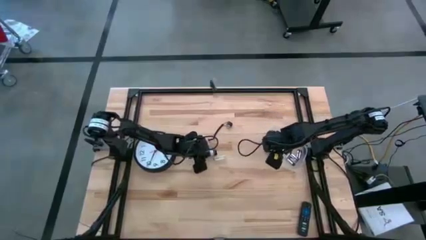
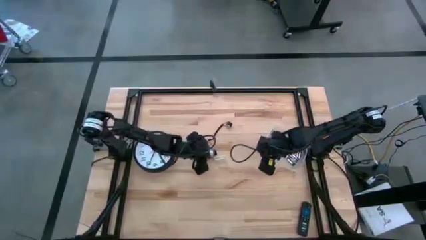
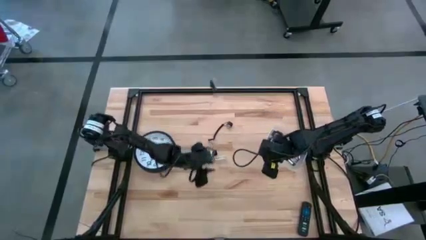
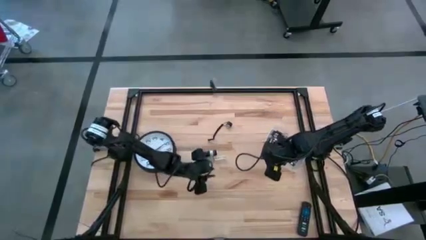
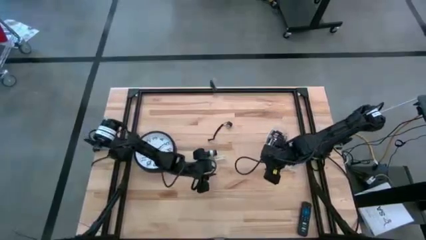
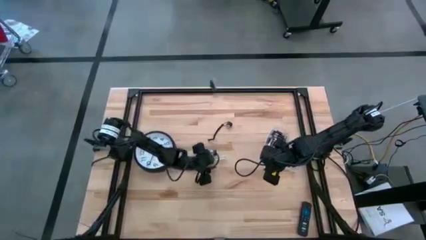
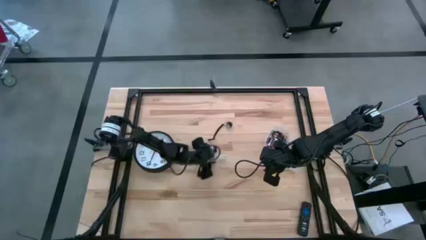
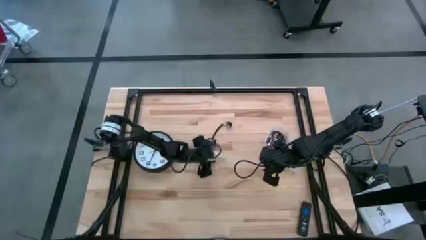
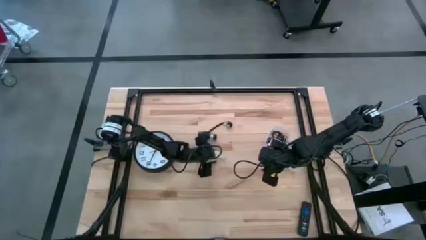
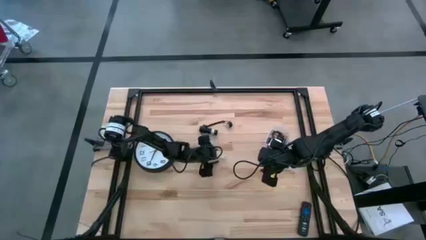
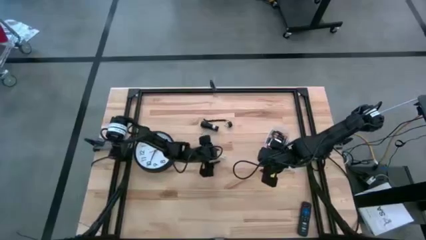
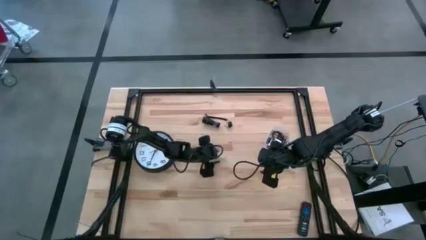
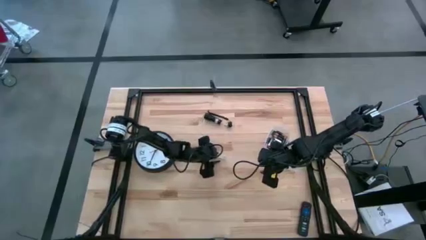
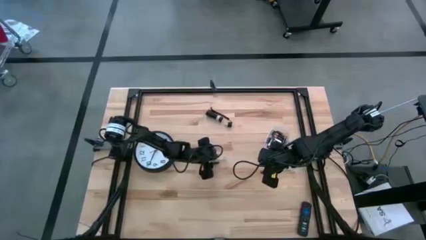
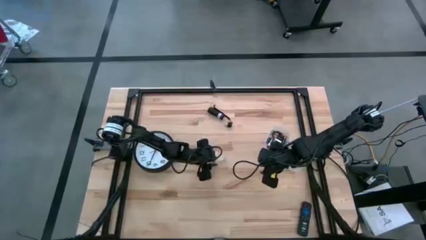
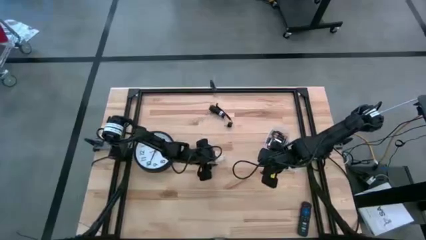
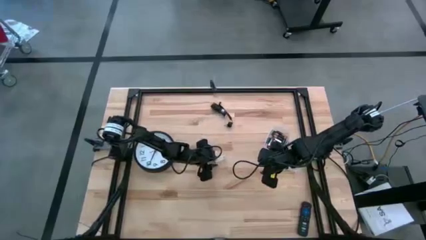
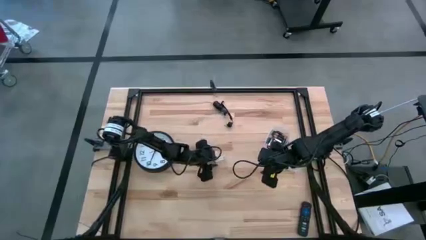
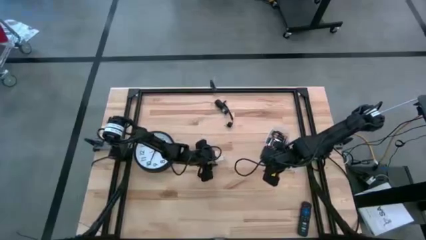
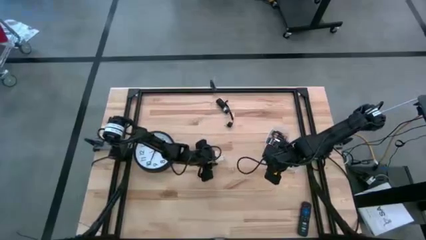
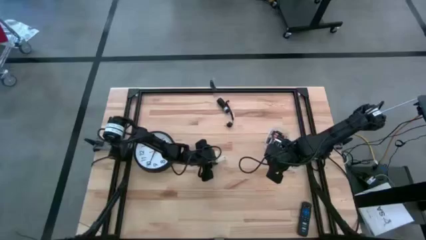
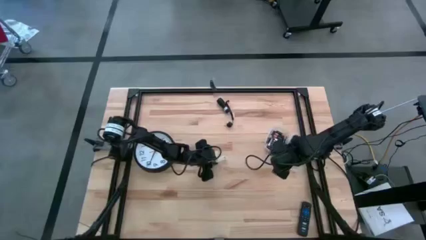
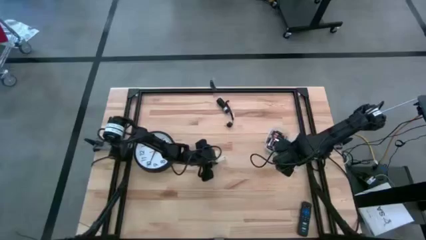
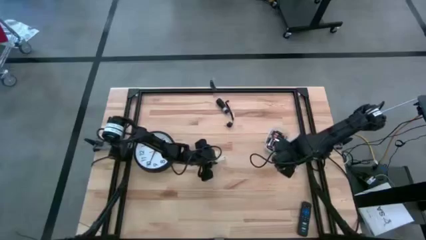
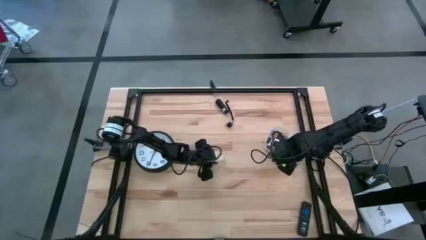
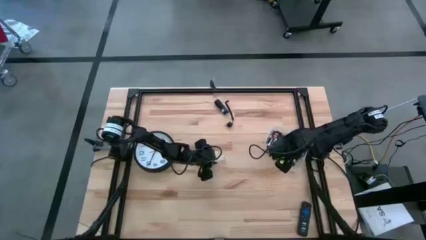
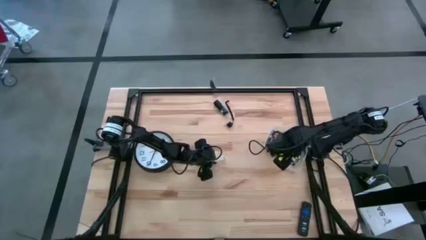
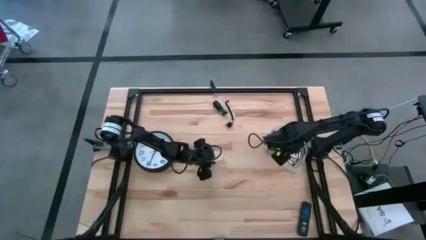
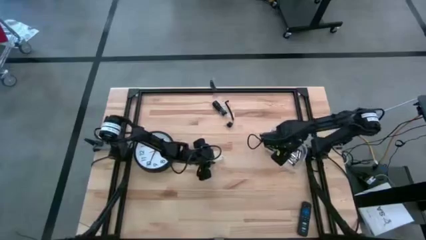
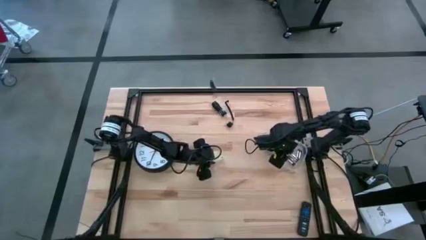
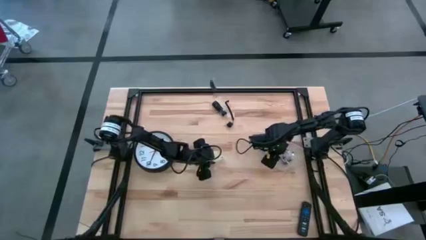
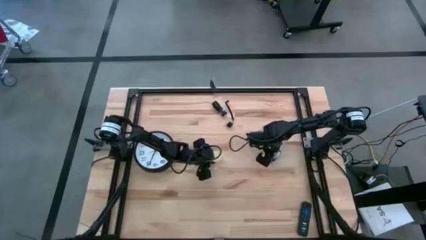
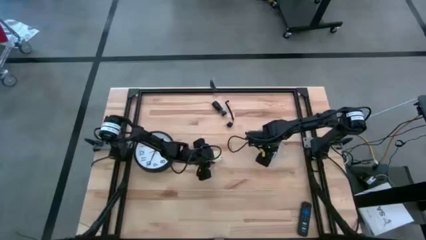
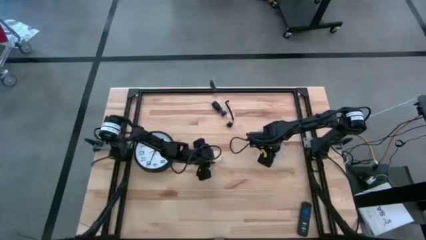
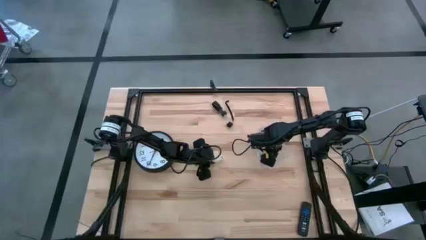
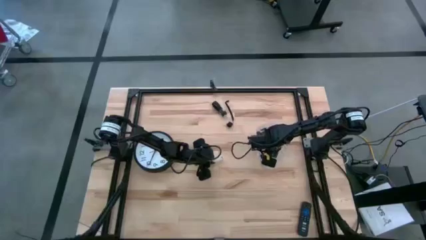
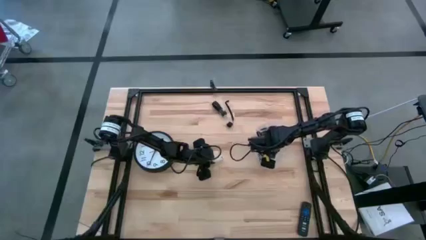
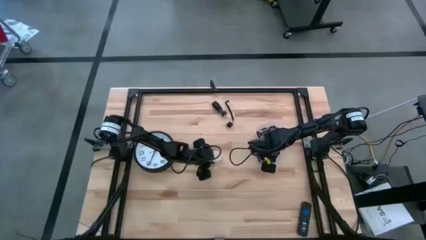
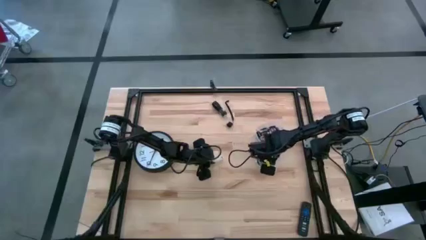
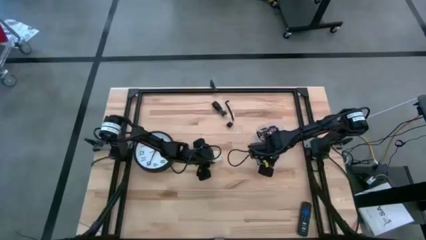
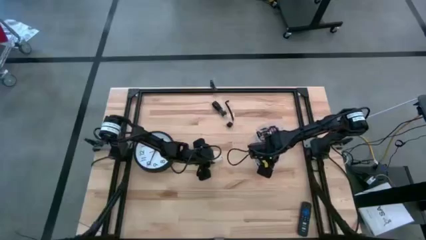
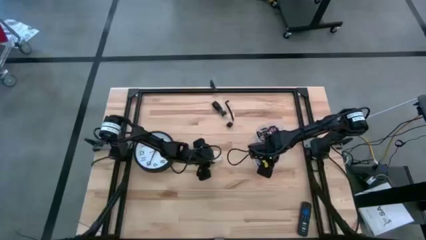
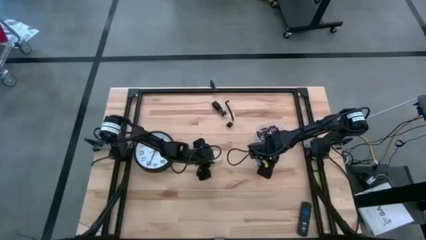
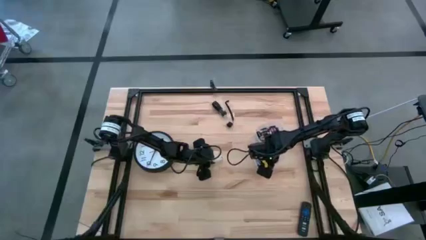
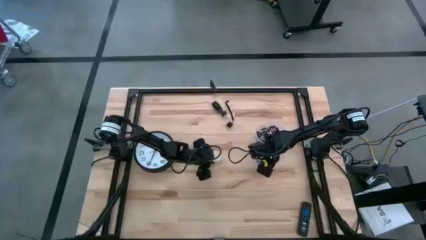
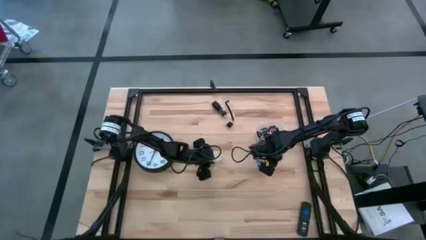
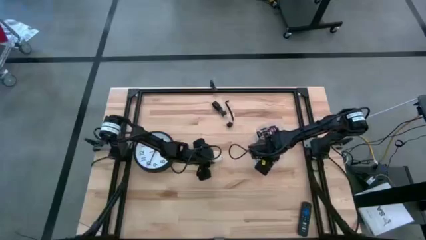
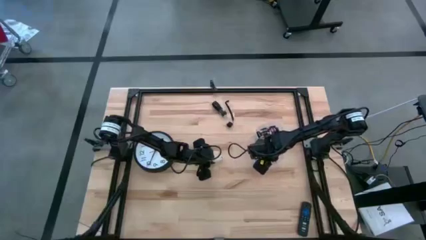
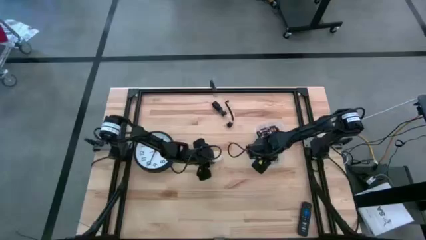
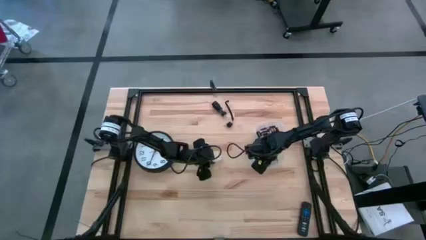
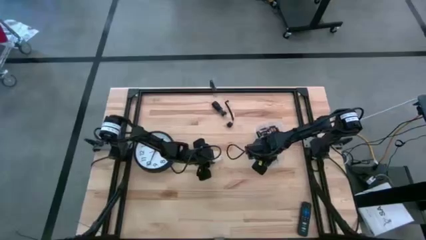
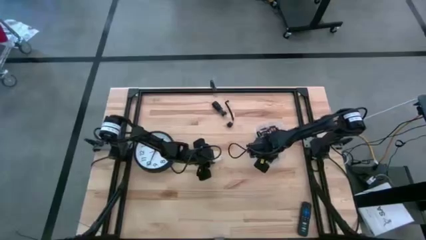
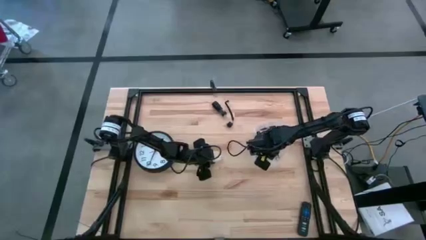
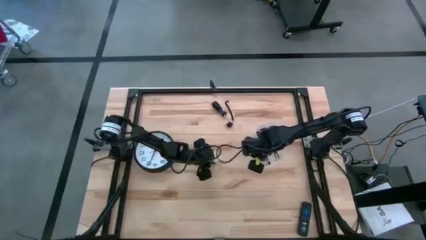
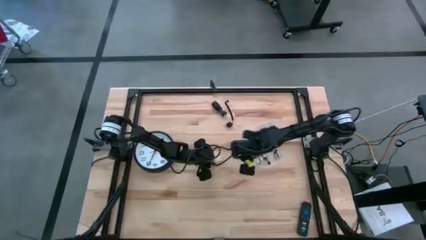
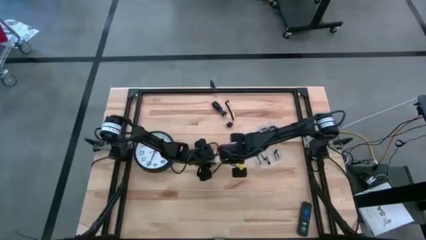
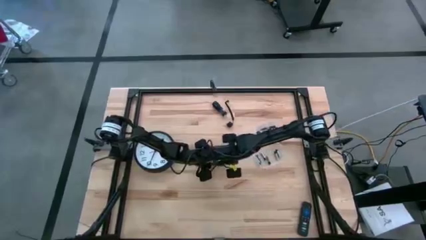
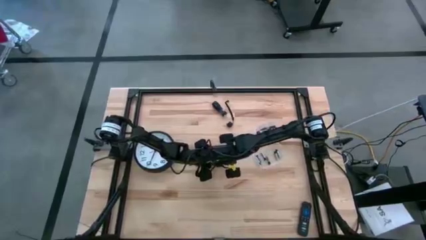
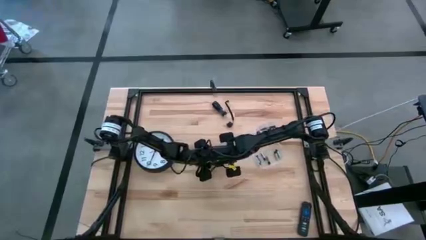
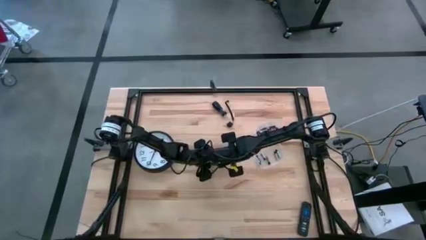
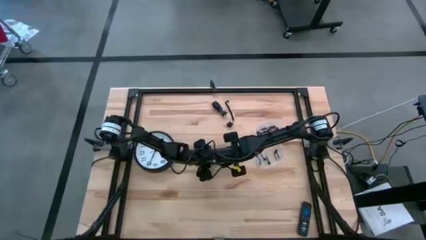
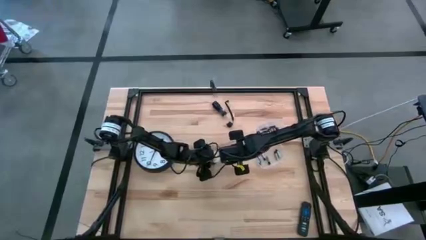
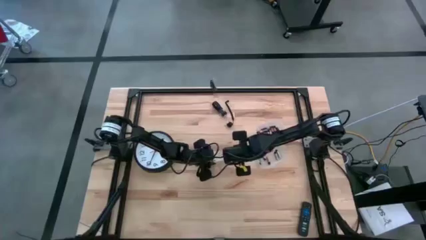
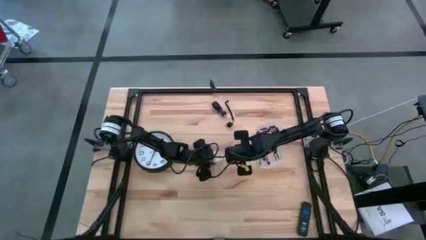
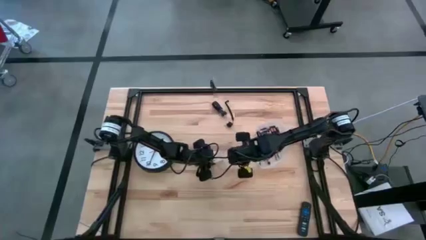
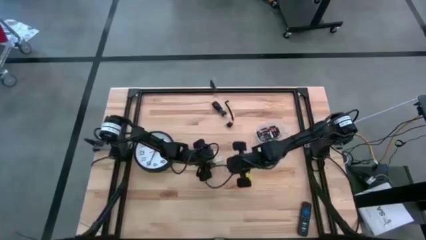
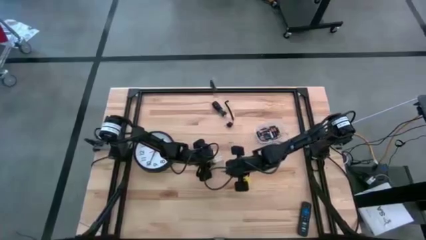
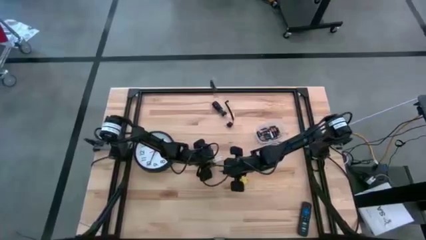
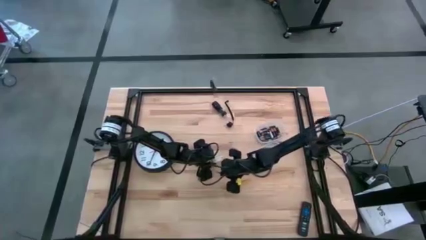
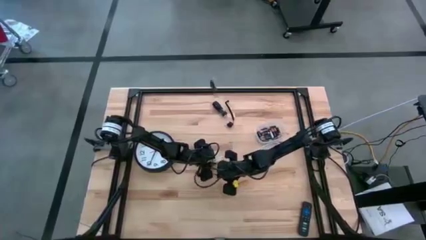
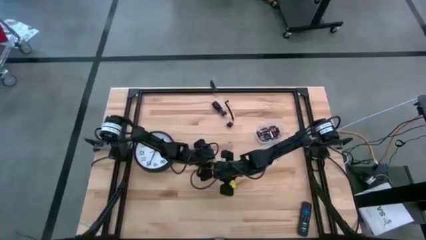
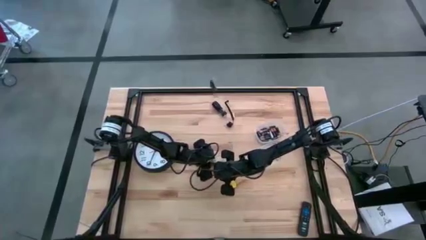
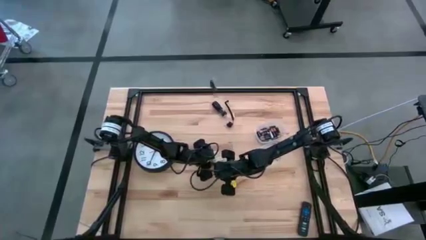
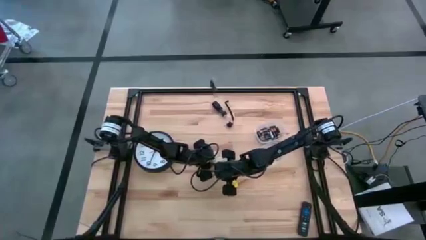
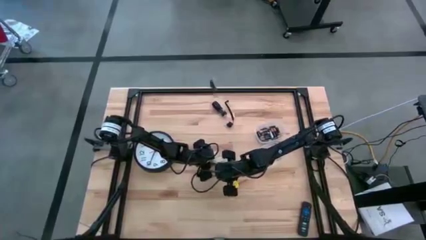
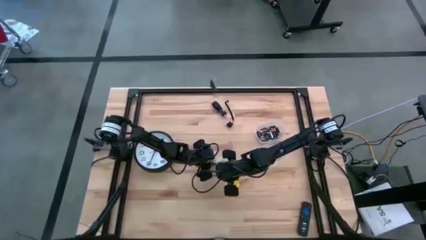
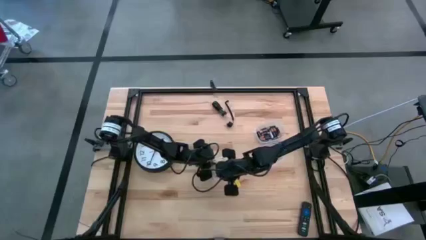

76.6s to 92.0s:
Task: Insert battery
Insert the silver battery into the white flashlight battery holder

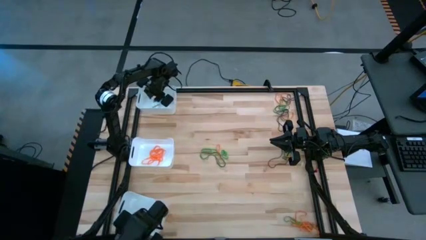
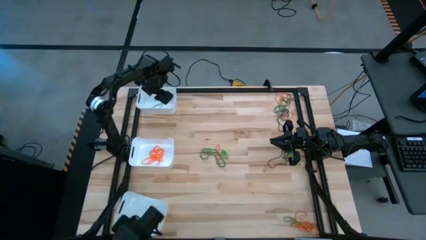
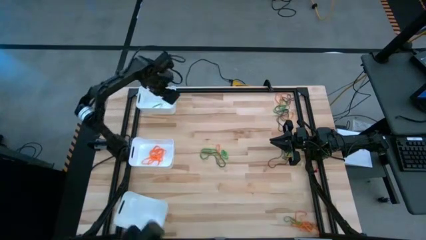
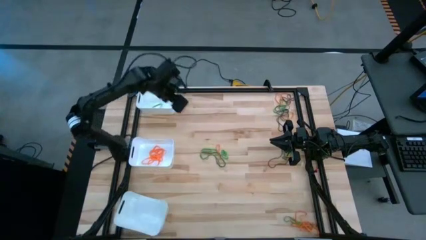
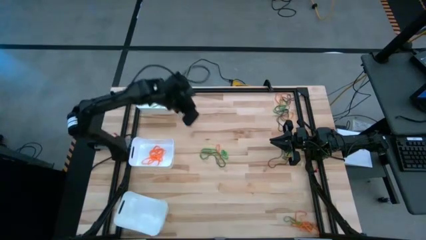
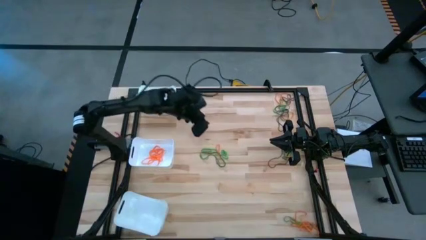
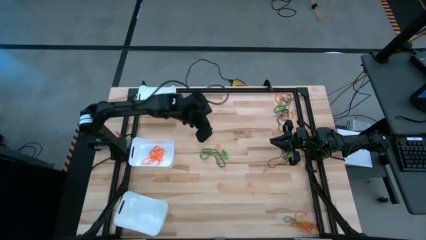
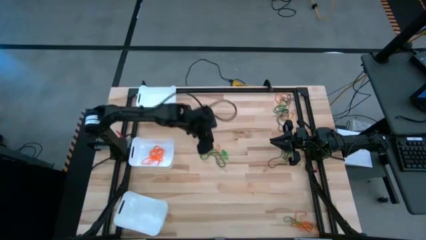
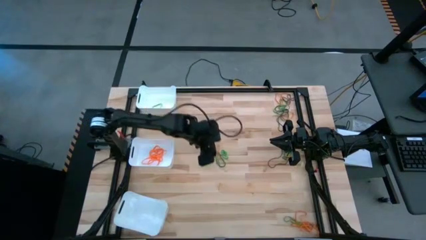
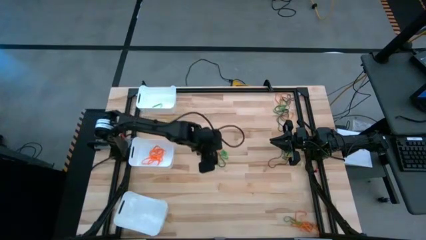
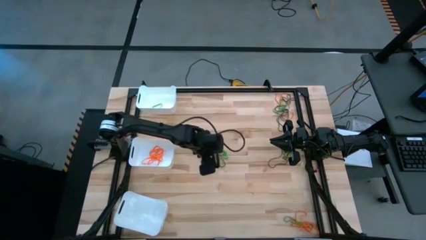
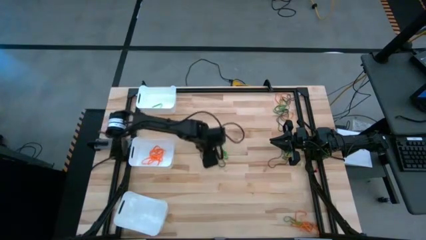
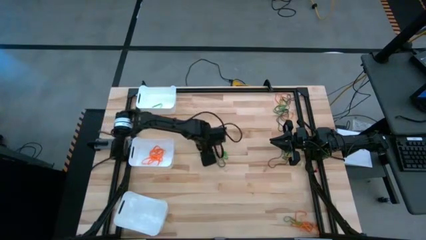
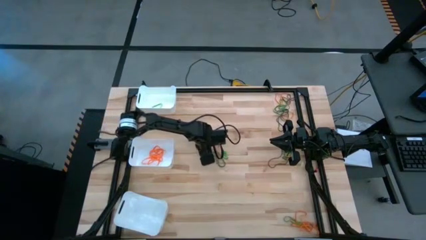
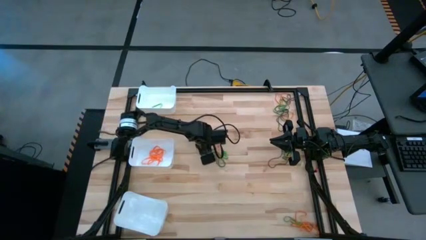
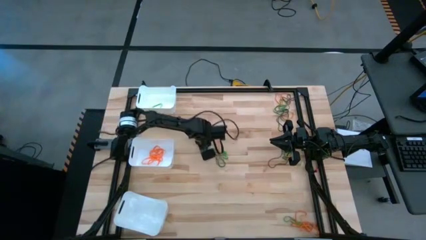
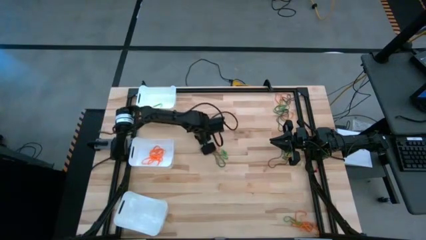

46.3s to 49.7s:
Task: Sort rubber bands into baskets
Put the green rubber band into the top white bin
